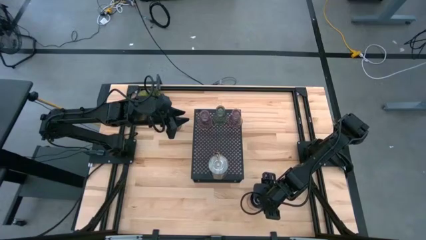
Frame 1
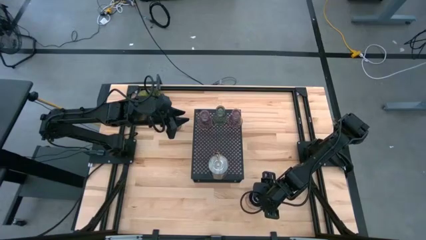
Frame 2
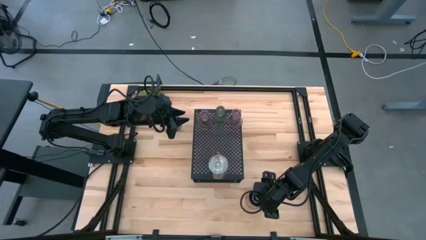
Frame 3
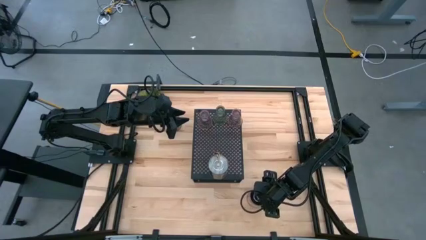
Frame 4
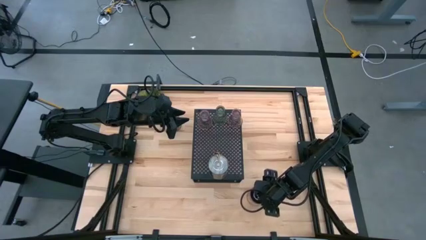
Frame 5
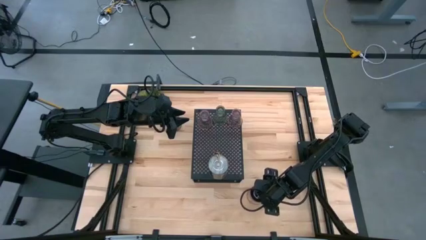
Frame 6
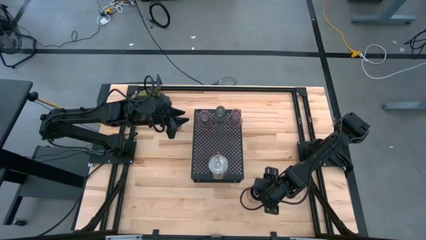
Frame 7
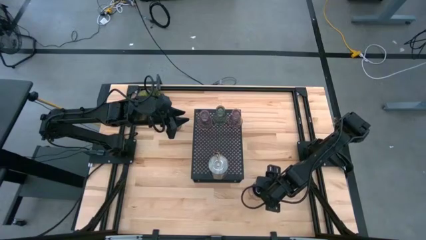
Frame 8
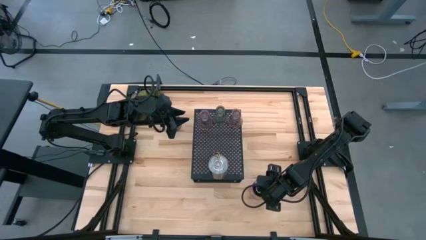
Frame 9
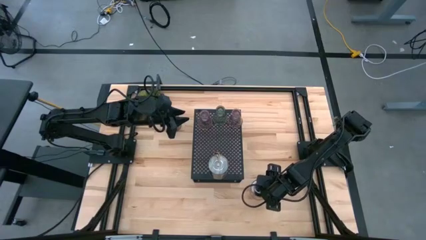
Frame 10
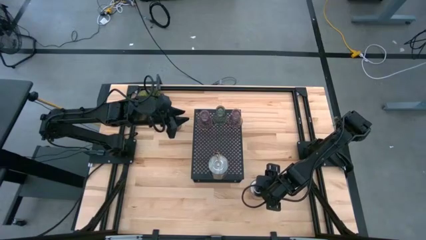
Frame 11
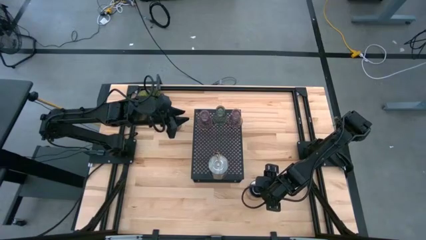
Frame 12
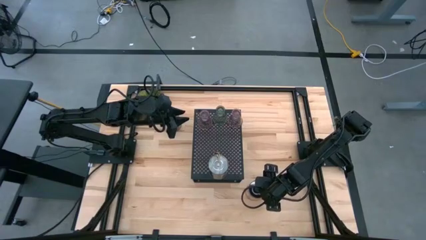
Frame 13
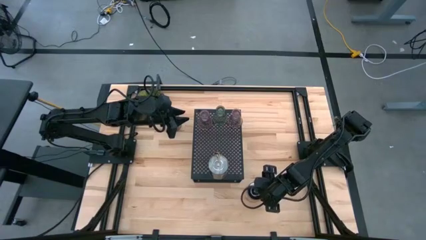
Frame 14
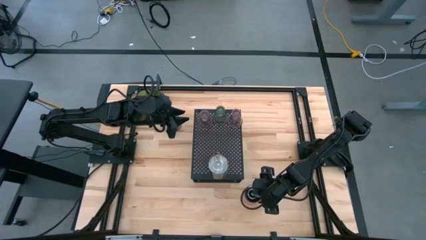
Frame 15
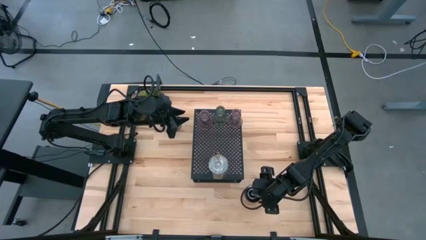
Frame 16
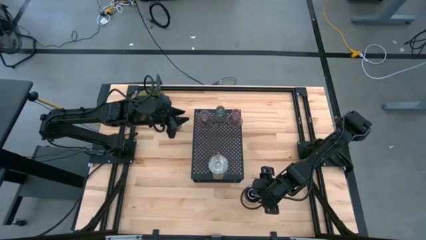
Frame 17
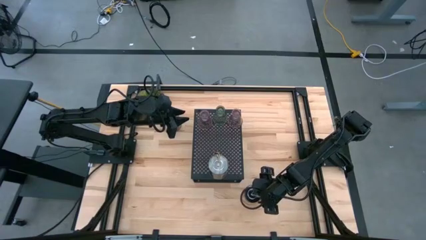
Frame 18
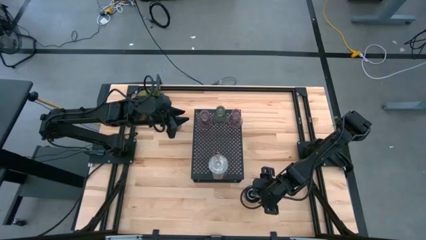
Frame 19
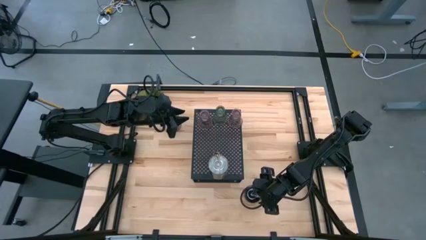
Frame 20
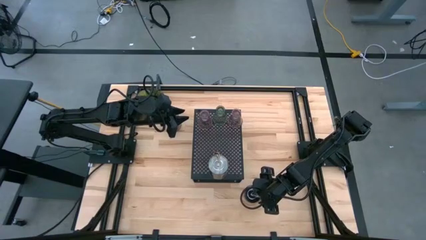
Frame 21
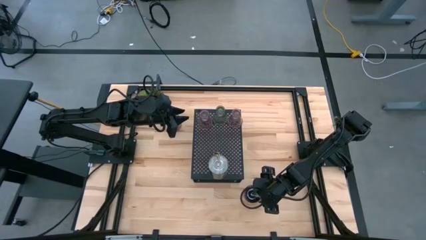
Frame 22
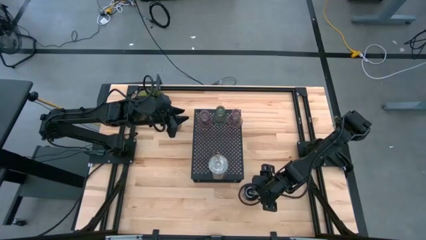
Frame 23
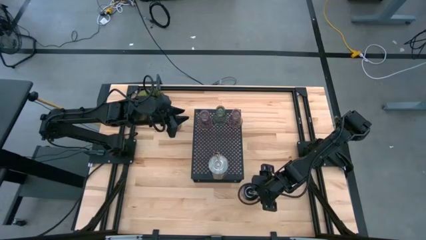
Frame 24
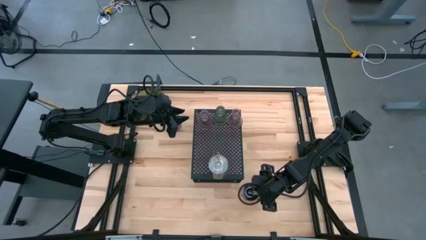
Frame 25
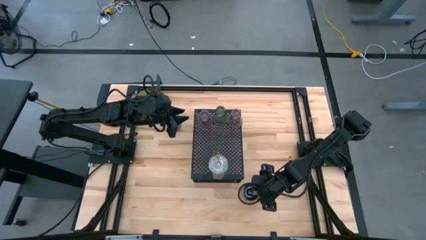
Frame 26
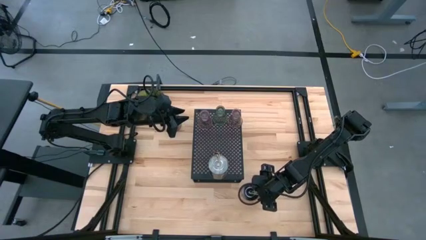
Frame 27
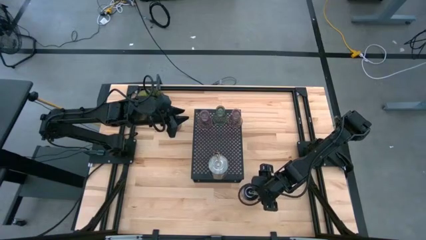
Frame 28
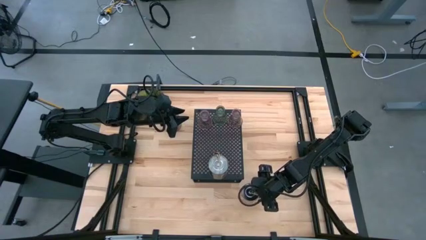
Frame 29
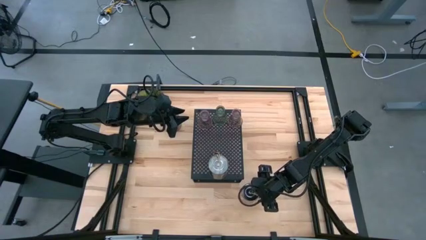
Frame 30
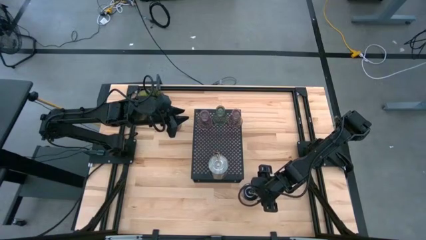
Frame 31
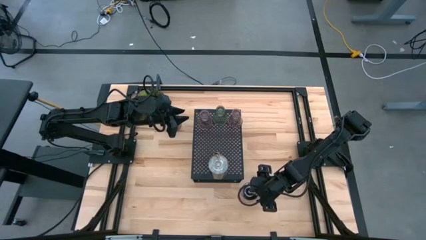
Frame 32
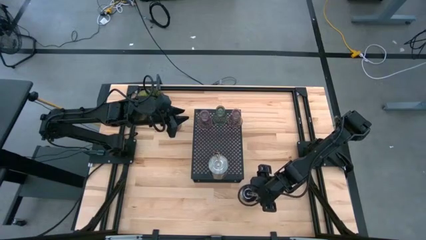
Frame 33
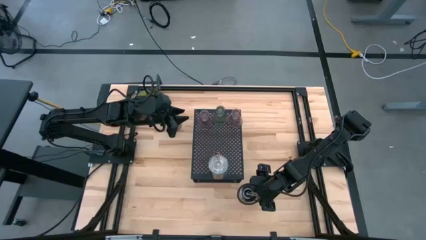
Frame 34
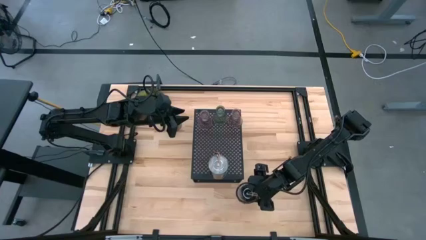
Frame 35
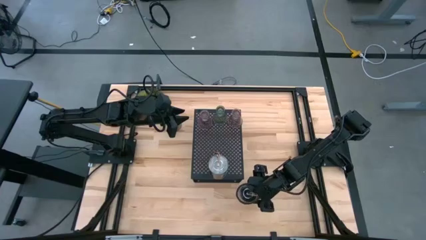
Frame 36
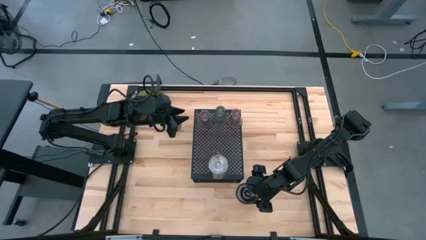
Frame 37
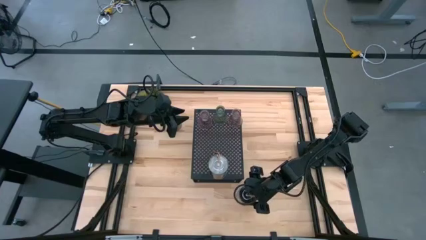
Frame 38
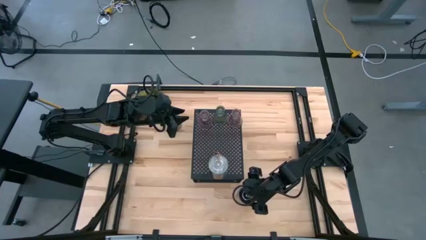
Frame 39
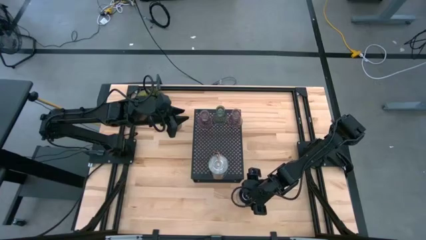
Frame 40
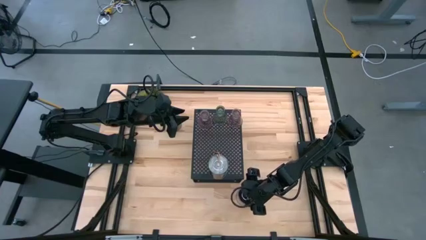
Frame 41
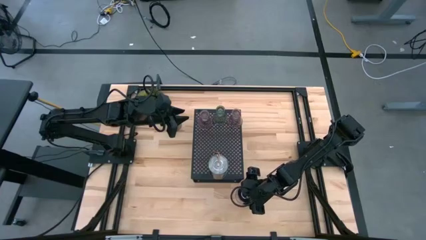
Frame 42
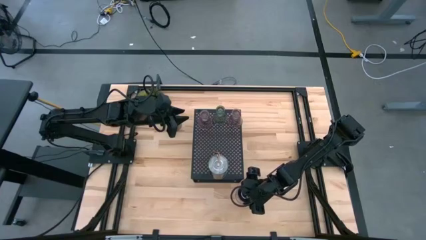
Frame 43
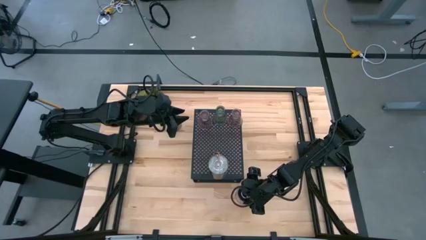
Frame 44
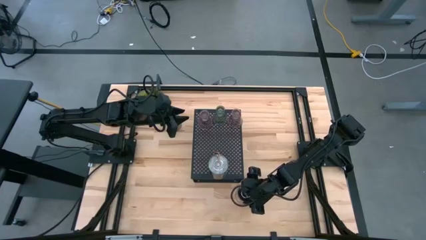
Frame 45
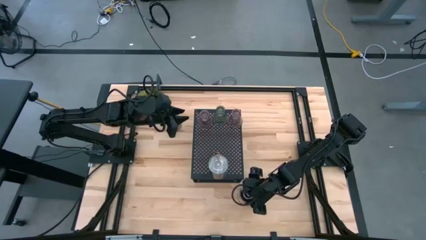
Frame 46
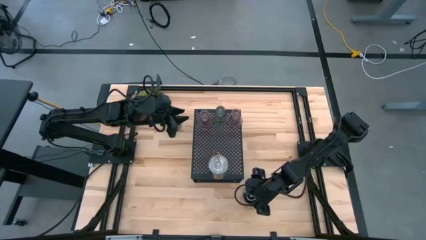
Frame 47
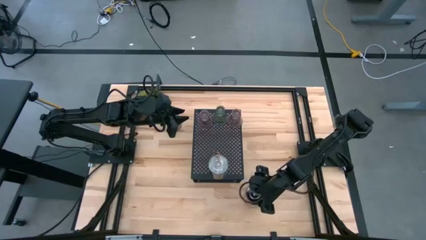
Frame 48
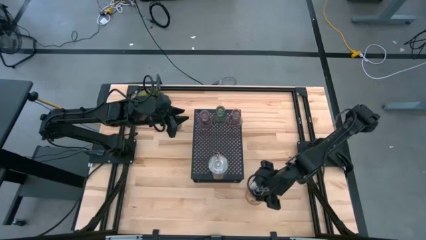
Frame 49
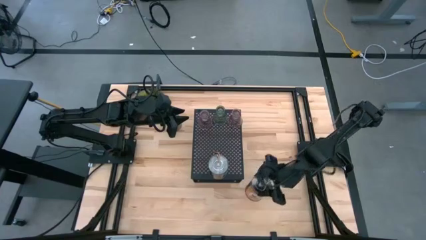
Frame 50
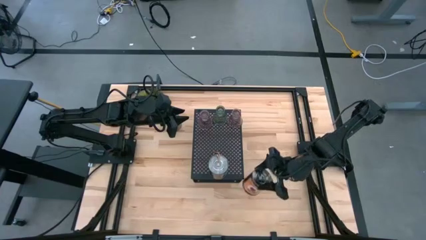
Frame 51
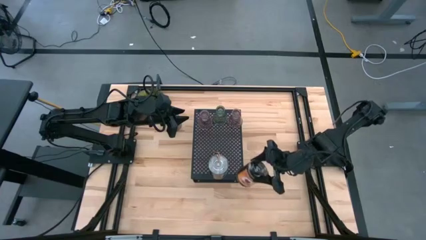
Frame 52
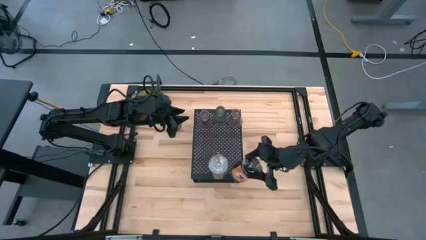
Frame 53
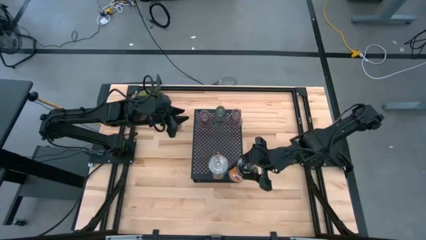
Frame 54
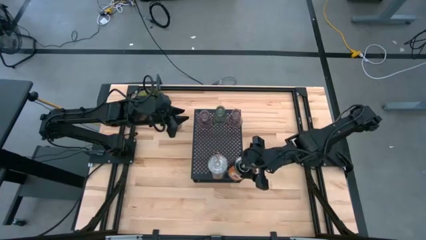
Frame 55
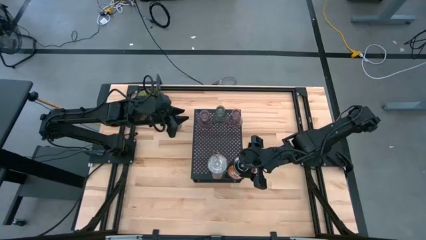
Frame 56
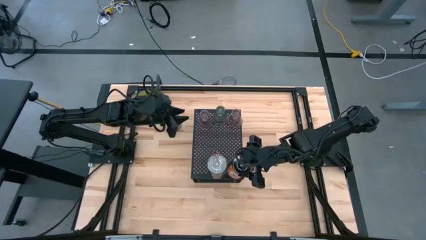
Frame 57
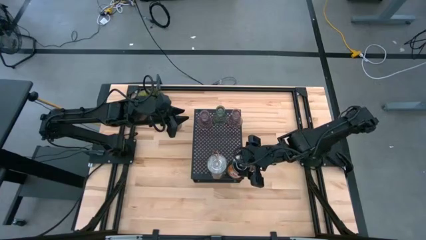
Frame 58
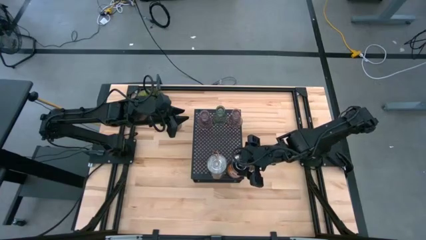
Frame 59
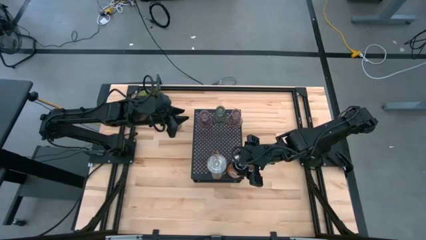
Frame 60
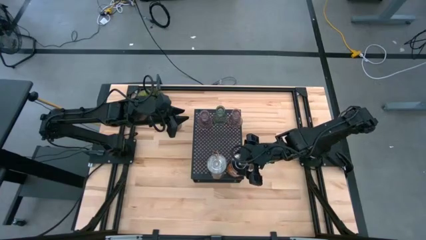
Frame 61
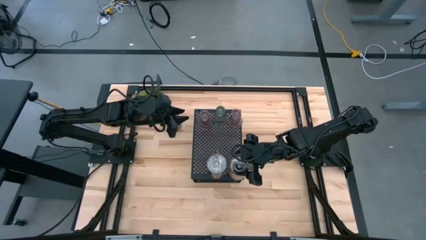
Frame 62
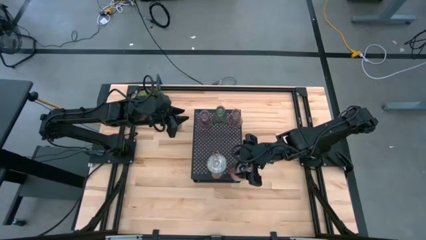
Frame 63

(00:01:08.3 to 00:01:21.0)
Task: Pick & Place candle stick holders
Put the orange scented candle on the shelf

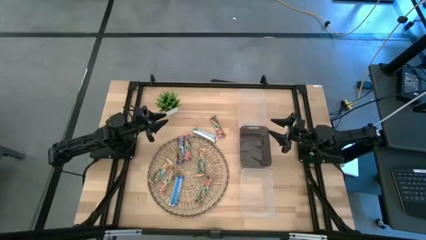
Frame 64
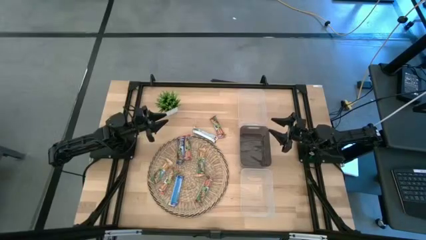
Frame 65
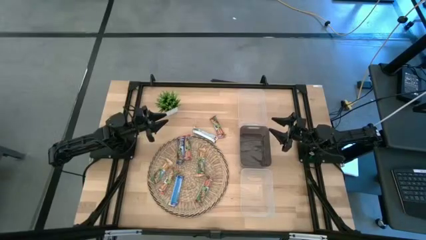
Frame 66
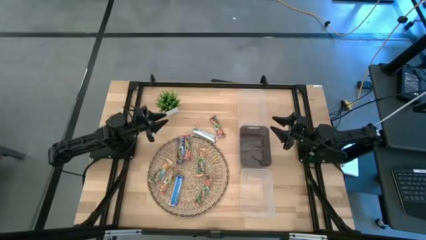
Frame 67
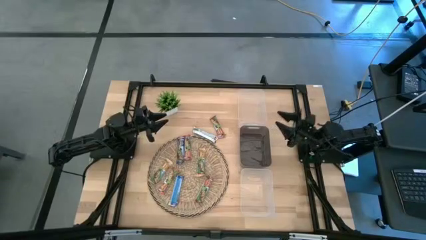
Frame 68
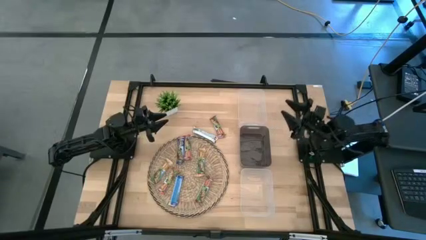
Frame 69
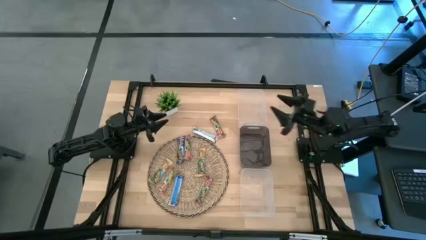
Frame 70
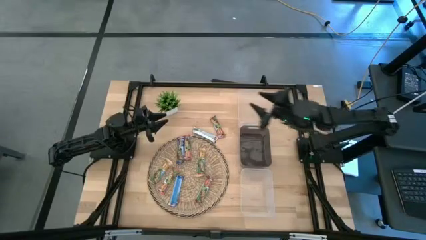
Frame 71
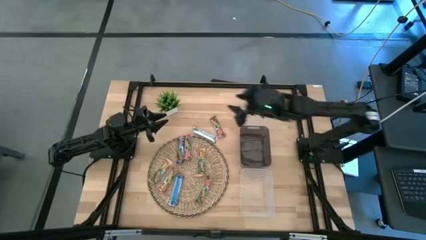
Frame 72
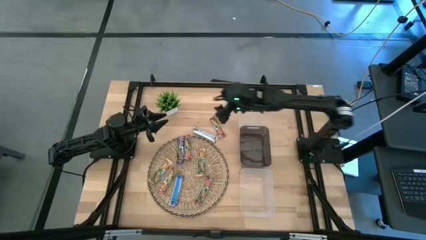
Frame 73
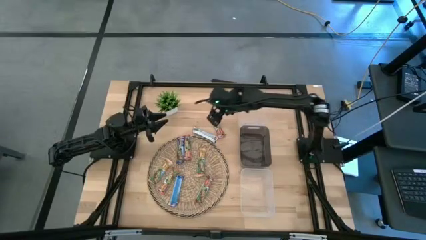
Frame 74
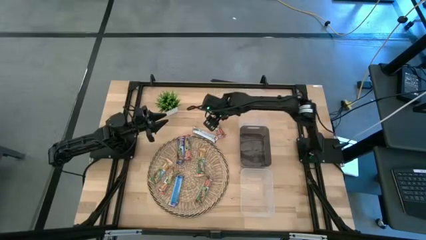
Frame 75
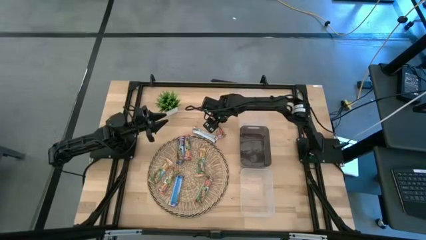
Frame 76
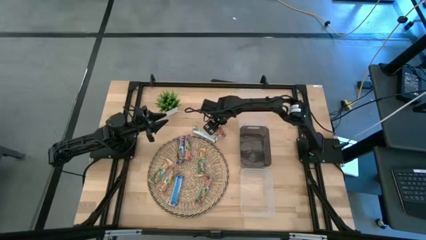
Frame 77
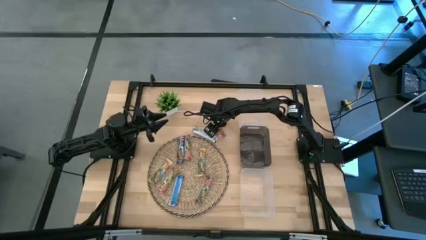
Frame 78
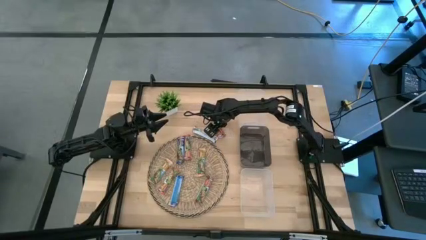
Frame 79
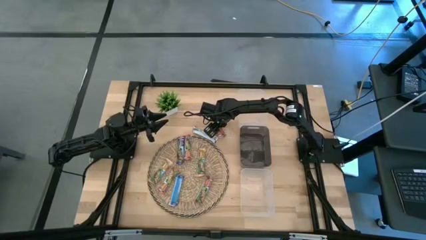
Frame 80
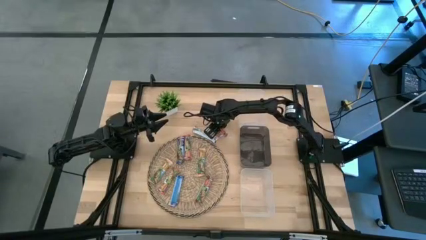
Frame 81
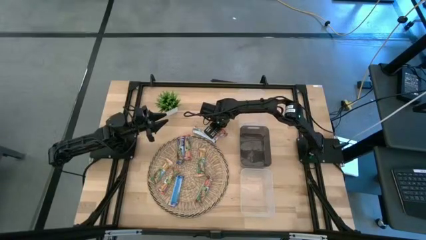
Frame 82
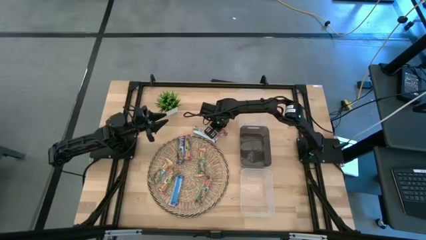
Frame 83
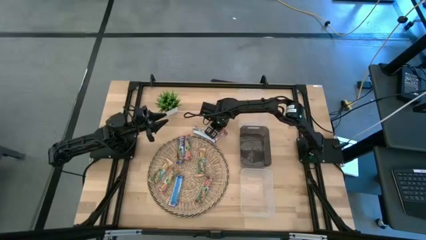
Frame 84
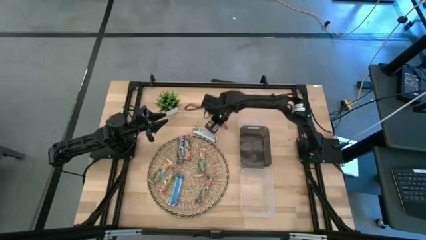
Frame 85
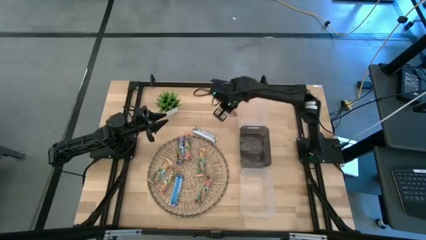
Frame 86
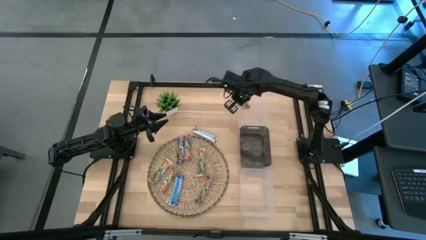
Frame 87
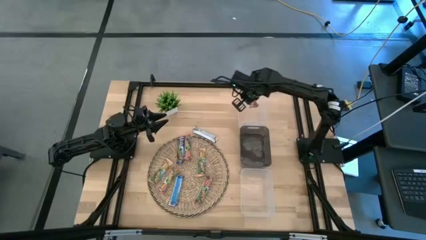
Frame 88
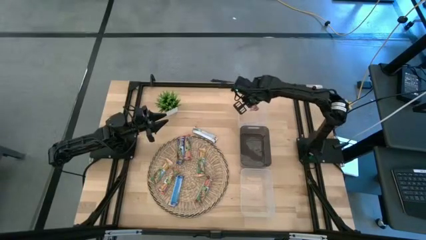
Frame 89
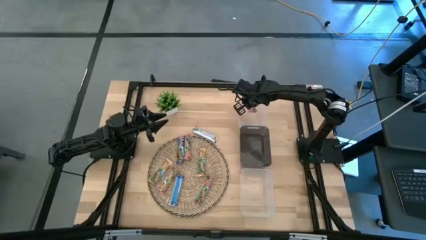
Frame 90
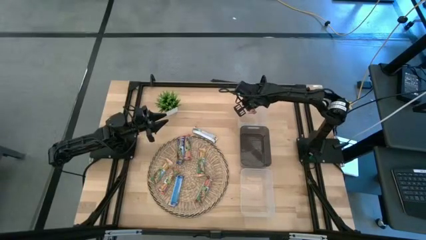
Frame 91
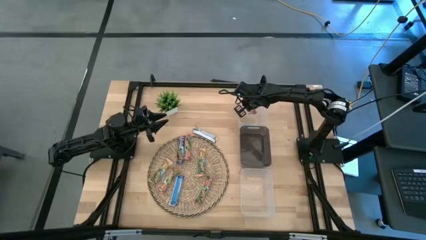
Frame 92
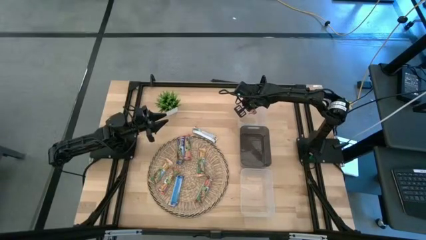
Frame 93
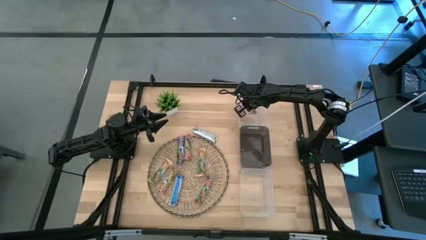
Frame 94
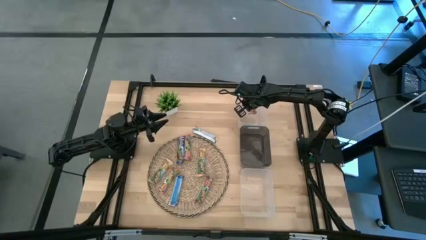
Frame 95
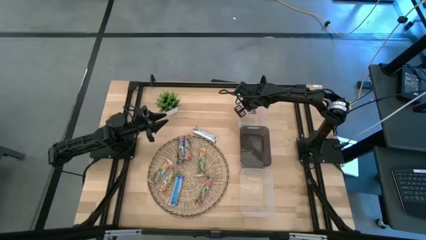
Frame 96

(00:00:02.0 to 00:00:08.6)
Task: Pick and place Granola Bars by type
Put the red granola bar into the top transparent bin
